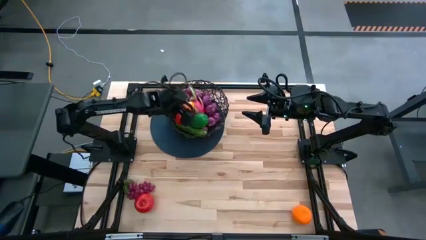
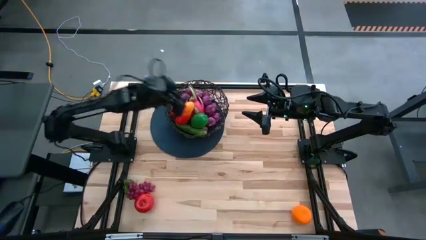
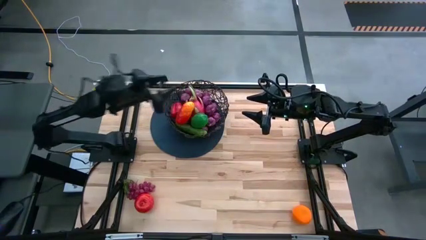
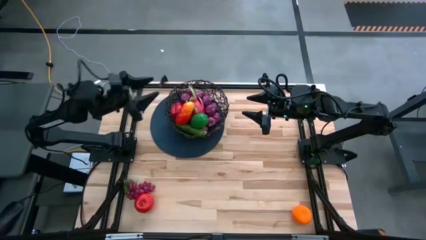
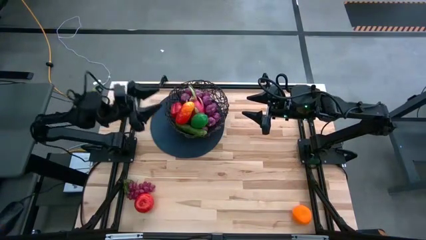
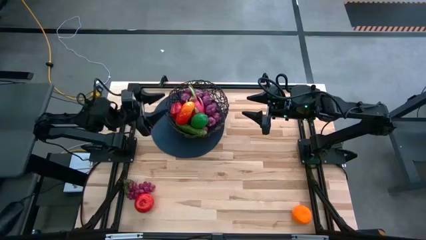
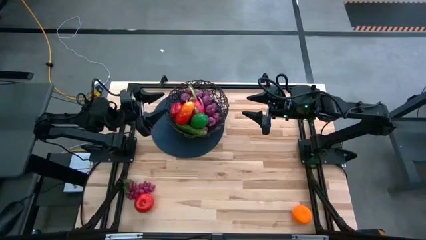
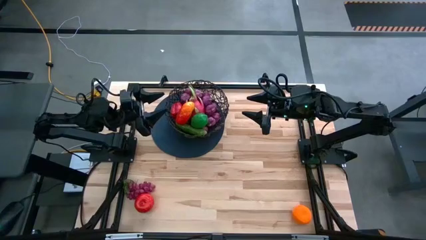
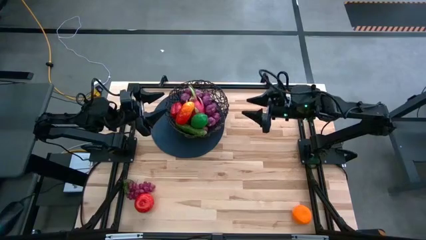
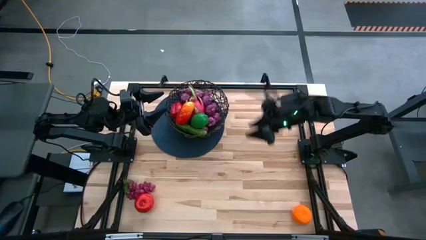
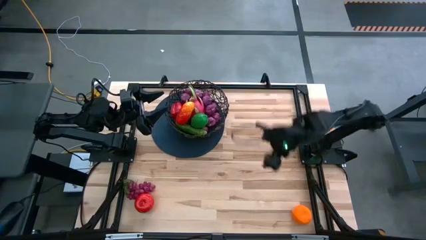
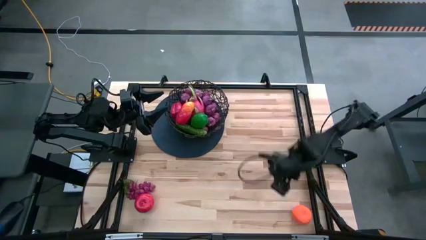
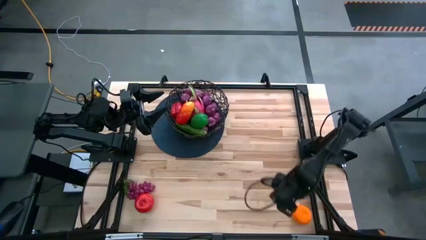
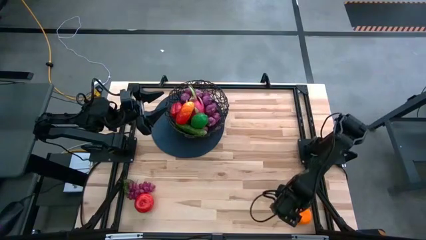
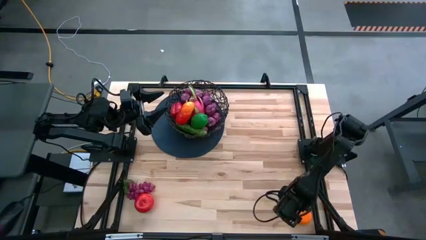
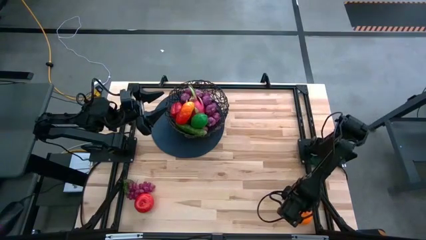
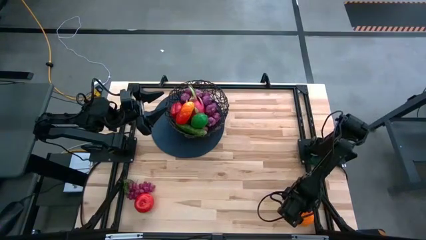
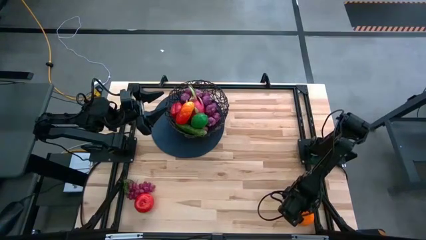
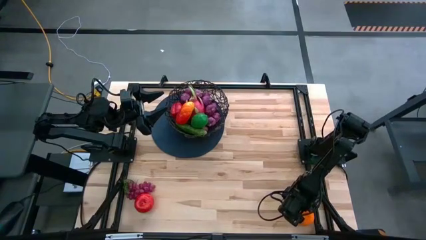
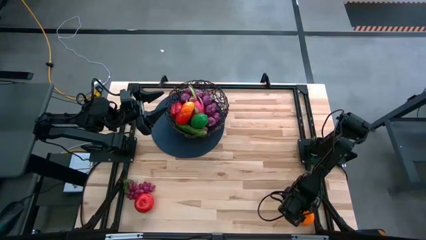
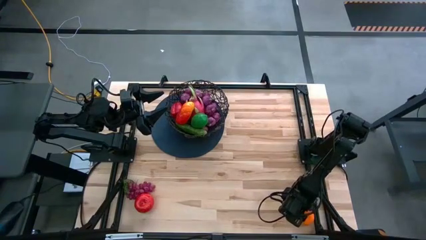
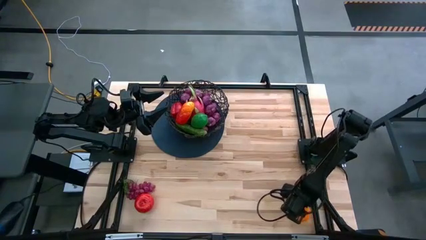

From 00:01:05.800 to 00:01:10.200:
Task: Build produce basket
Put the orange into the black basket

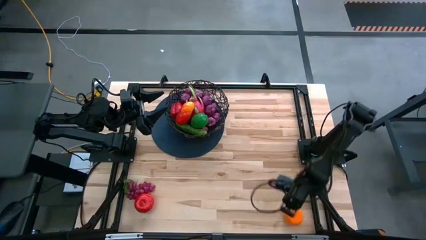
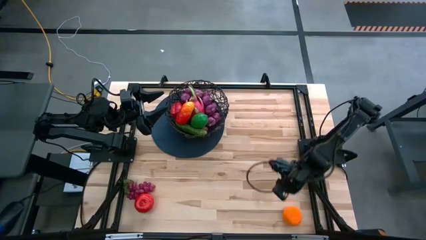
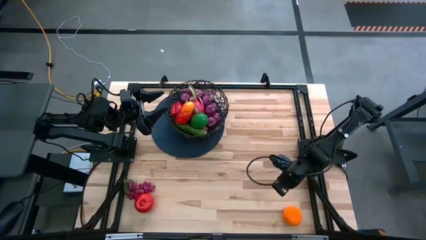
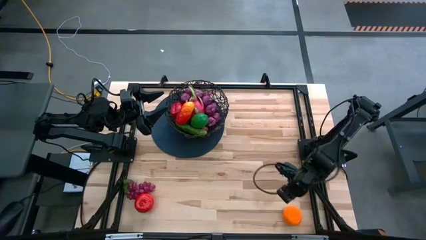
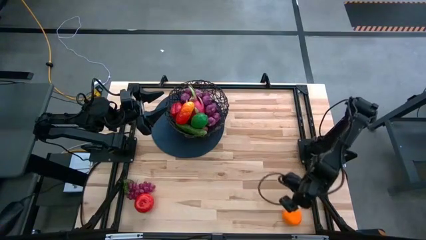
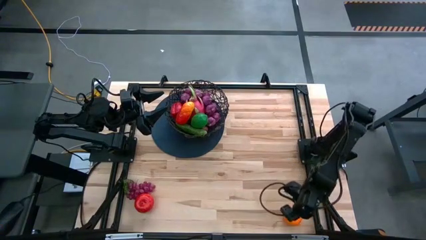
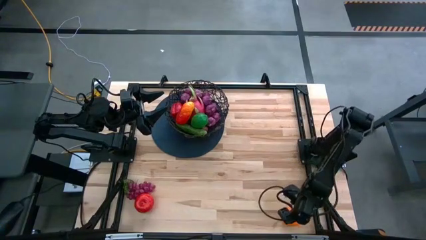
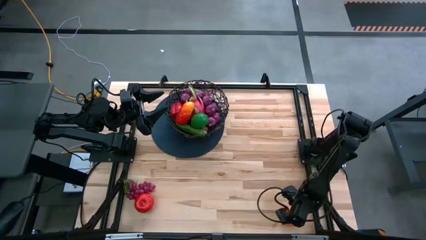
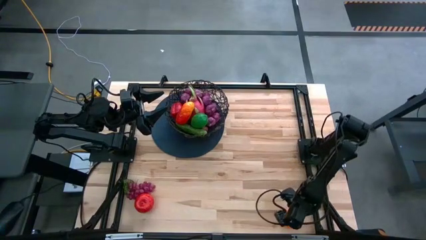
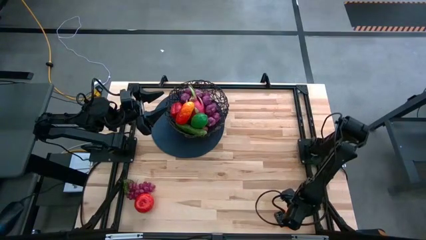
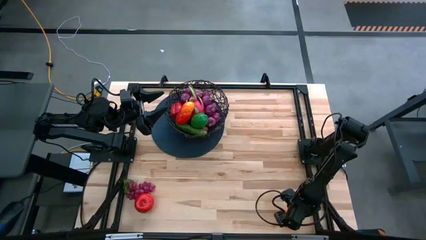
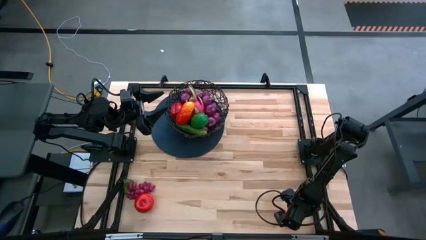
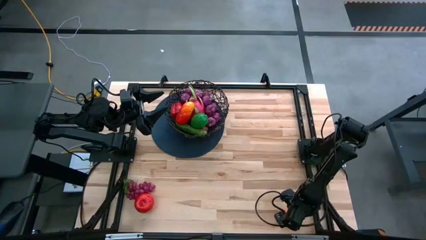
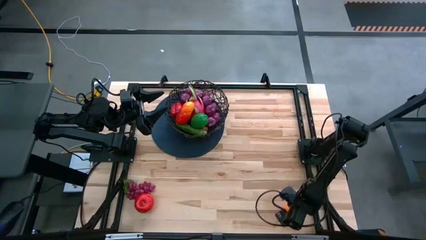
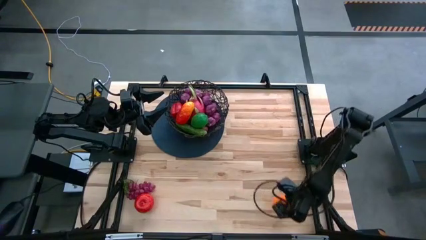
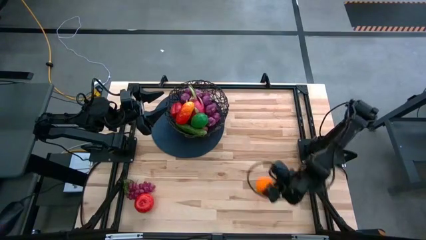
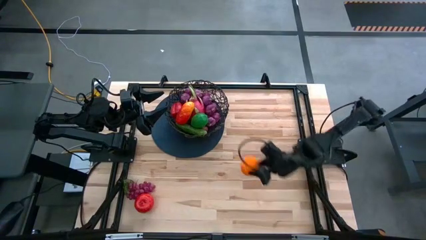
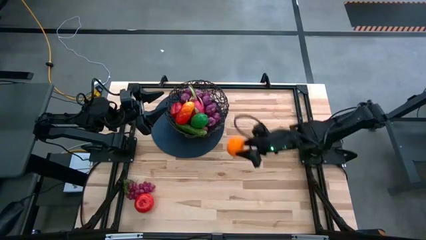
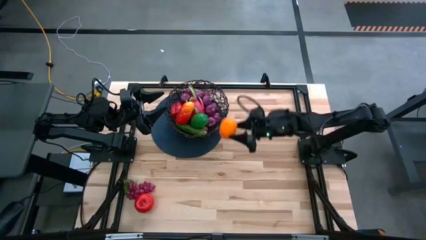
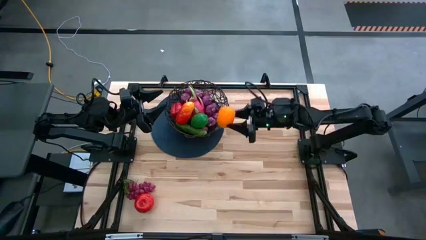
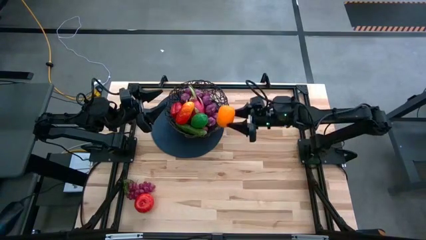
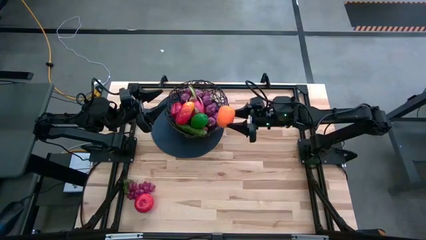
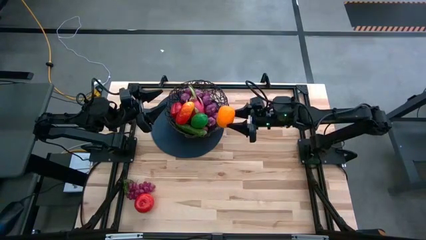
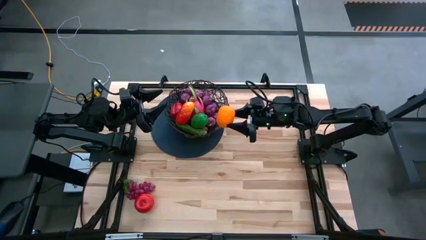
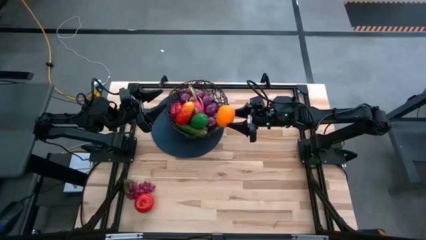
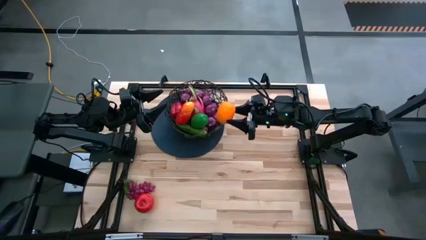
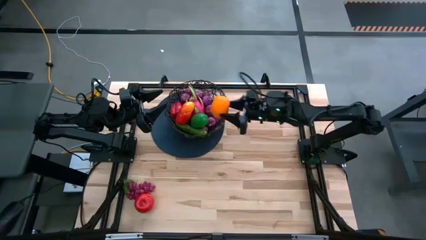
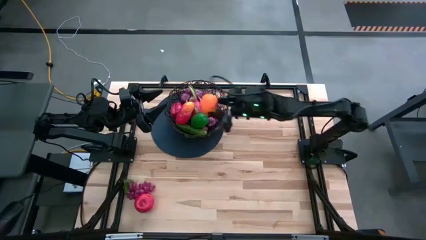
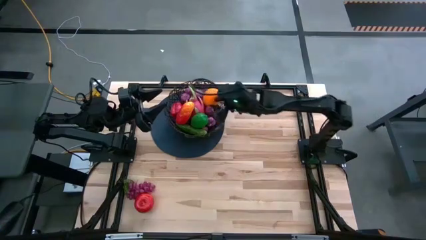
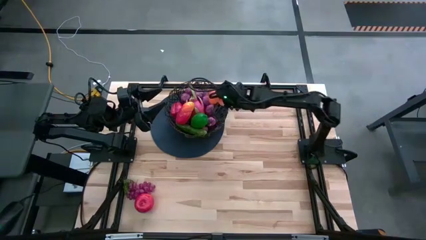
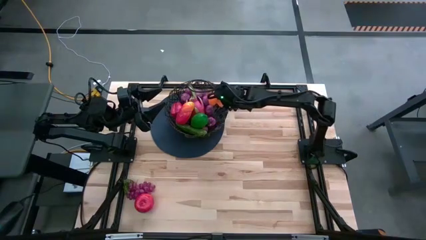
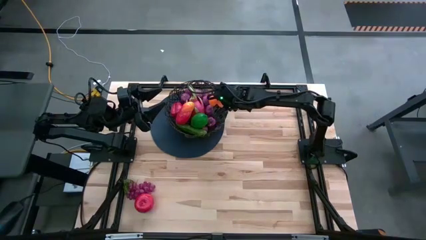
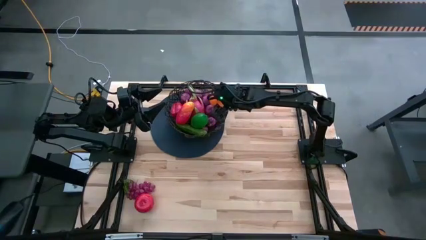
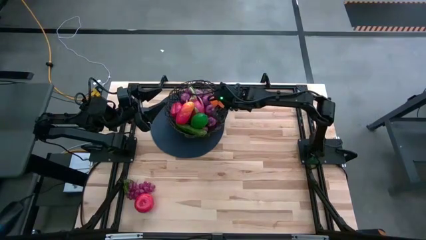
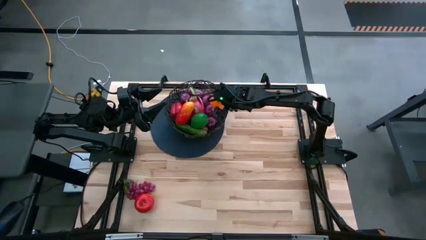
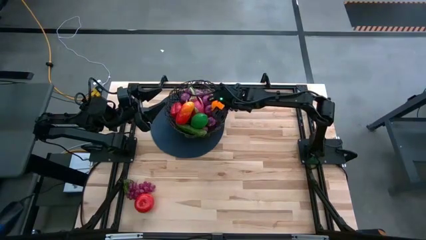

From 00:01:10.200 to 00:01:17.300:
Put the orange into the black basket

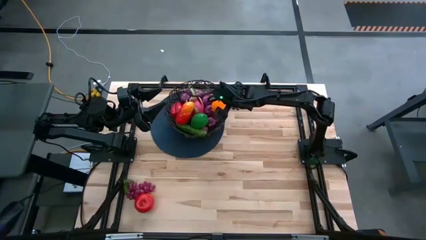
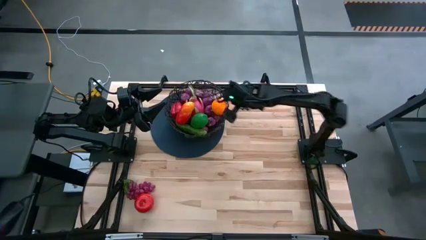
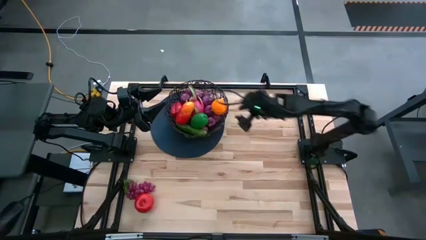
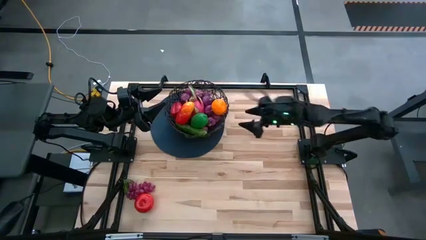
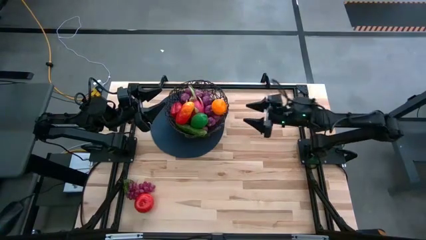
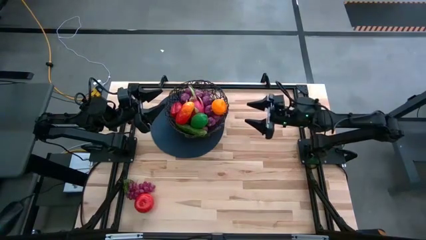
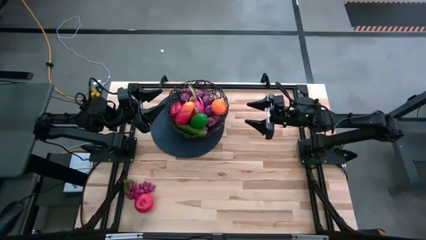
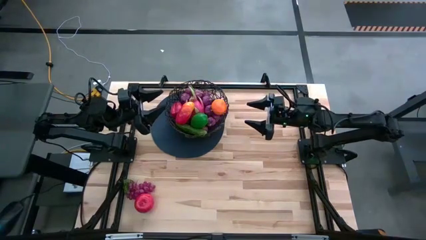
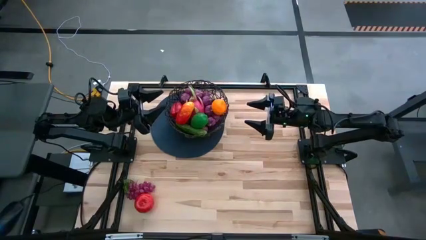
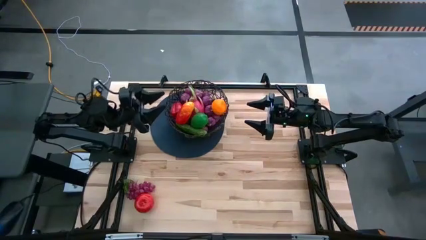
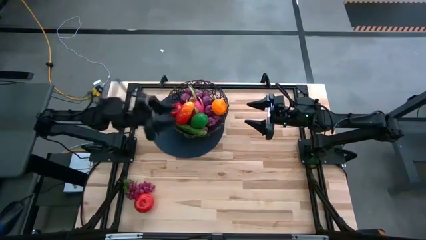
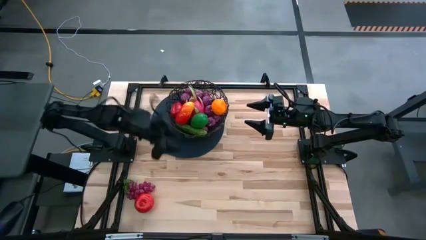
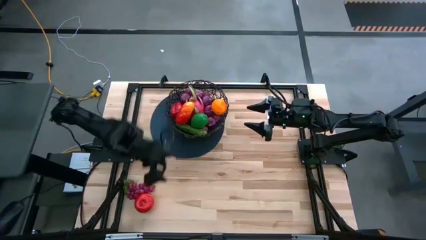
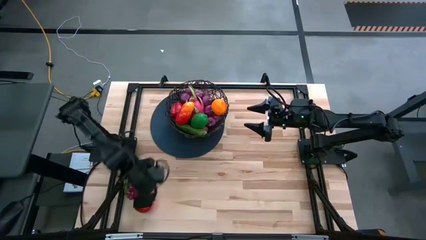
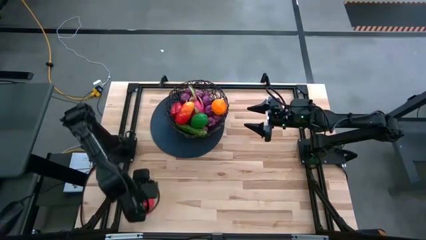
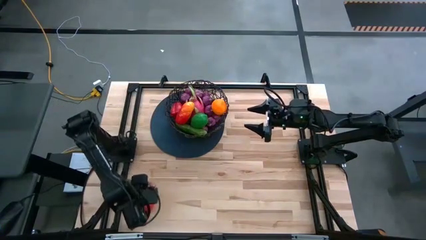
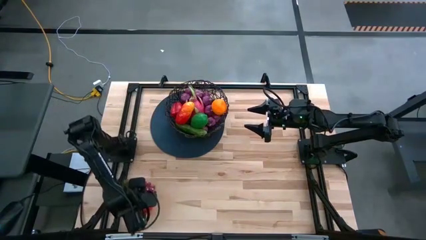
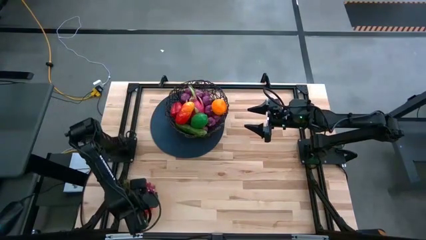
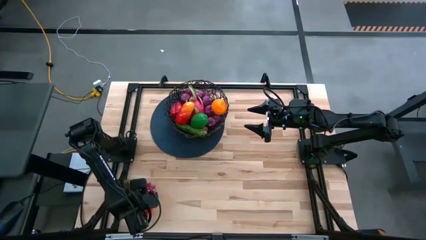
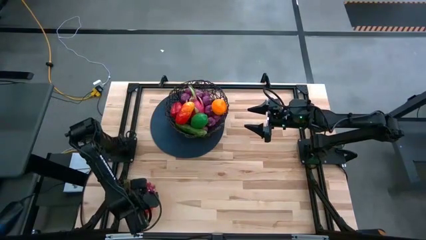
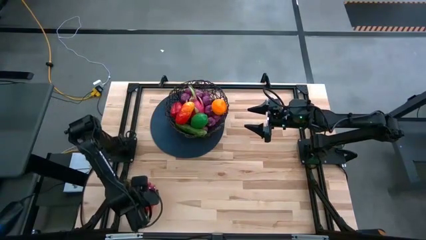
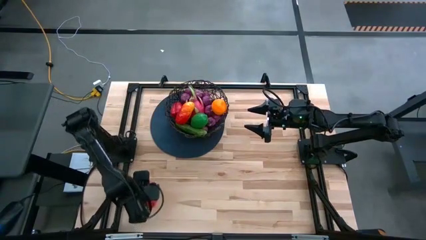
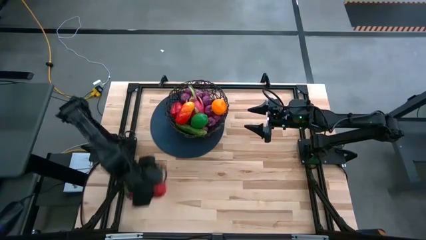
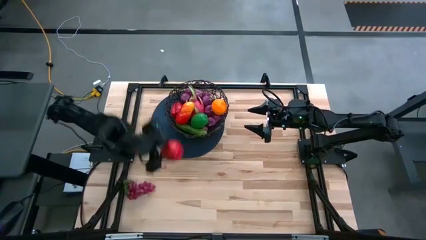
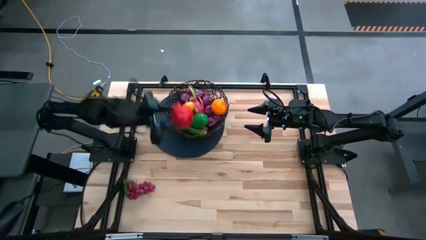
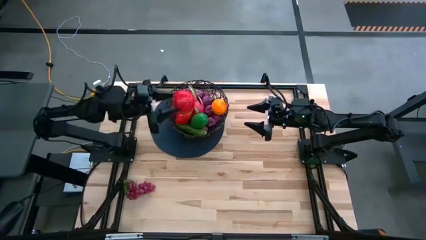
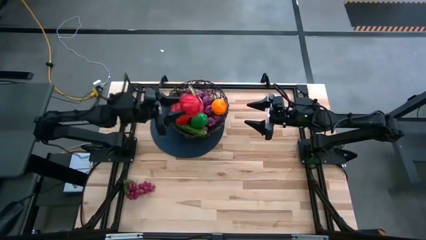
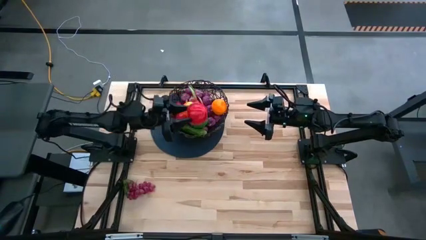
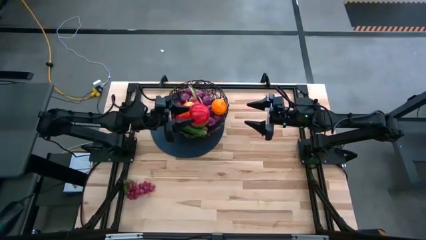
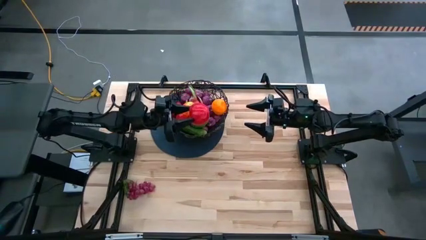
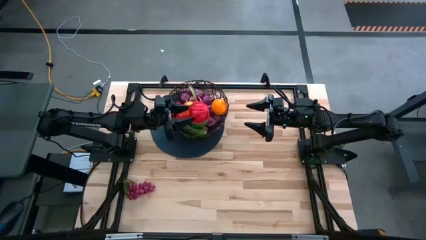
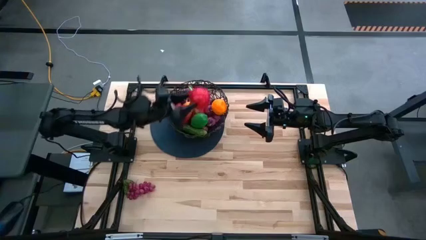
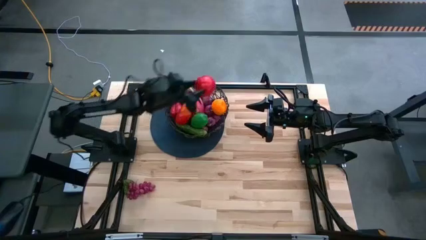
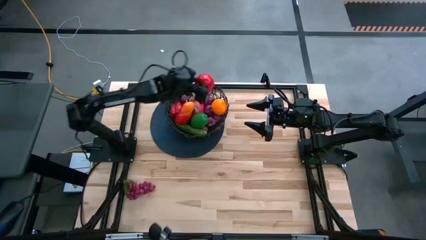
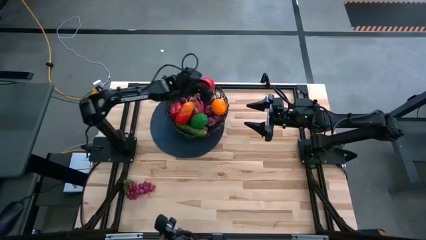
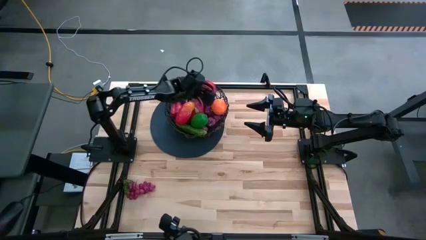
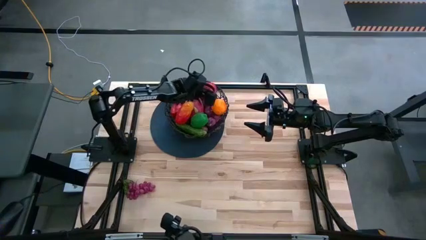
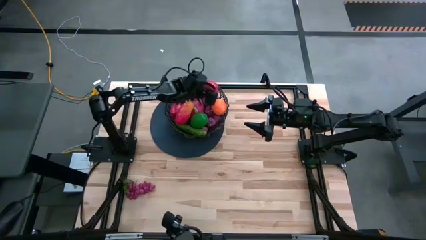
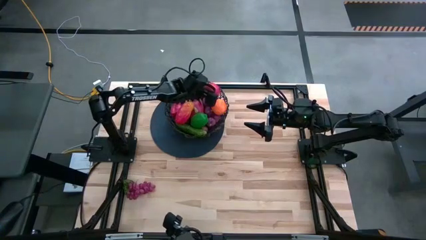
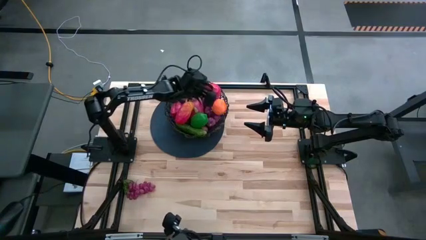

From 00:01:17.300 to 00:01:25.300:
Put the red apple into the black basket
